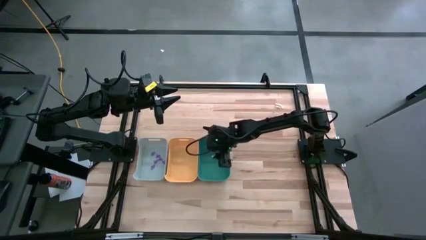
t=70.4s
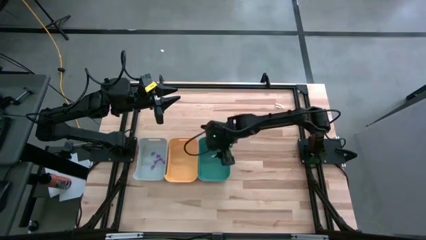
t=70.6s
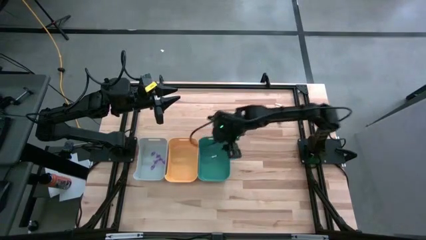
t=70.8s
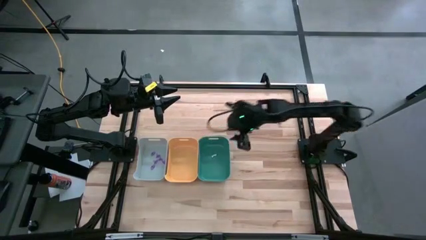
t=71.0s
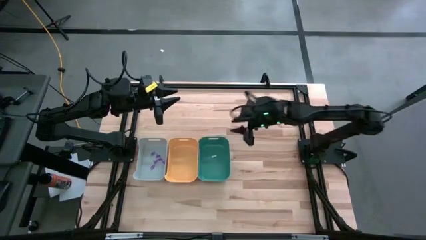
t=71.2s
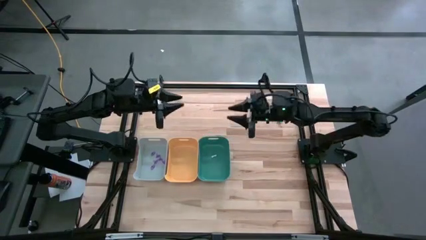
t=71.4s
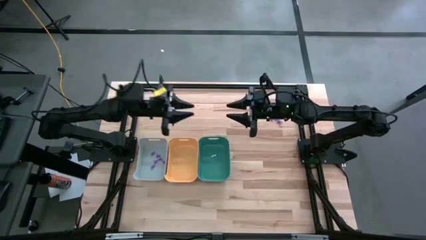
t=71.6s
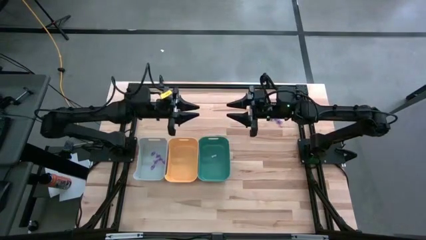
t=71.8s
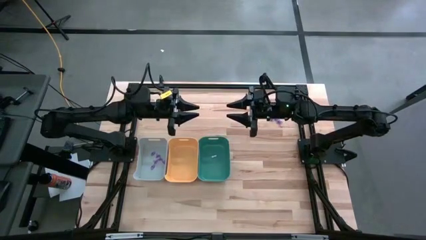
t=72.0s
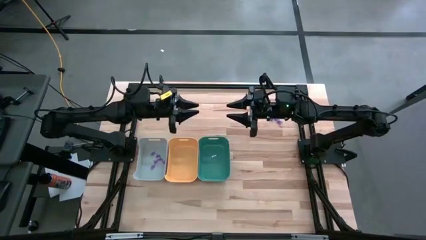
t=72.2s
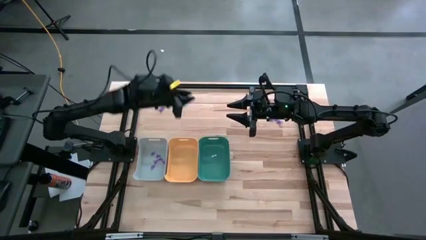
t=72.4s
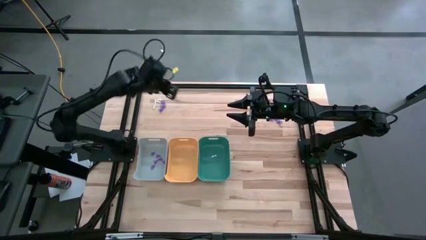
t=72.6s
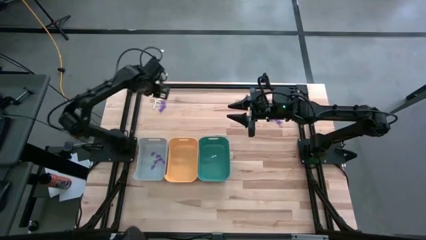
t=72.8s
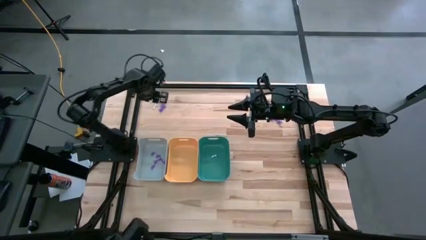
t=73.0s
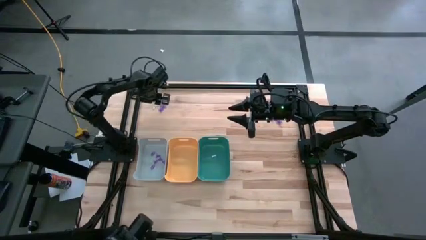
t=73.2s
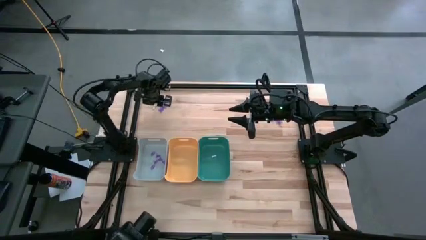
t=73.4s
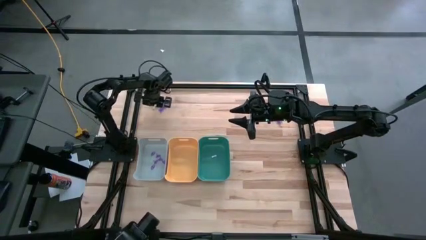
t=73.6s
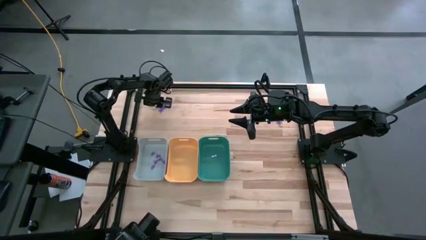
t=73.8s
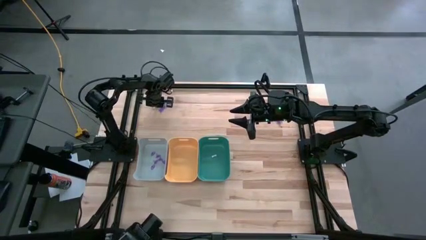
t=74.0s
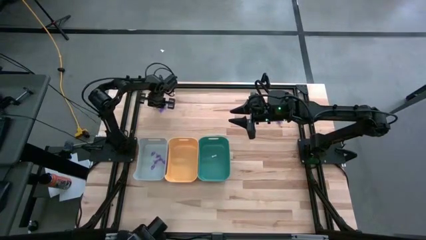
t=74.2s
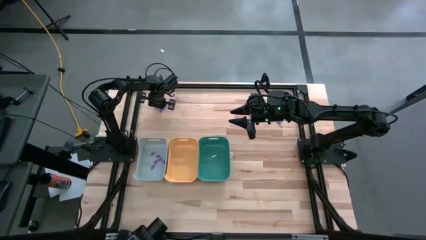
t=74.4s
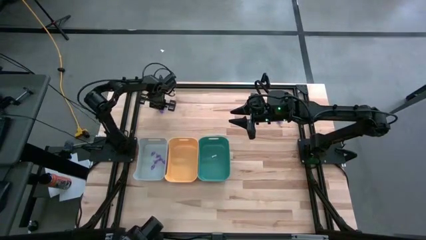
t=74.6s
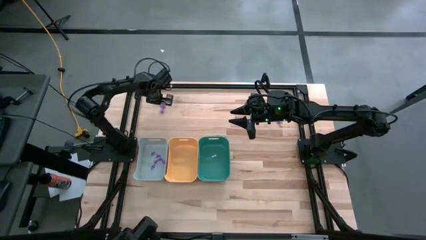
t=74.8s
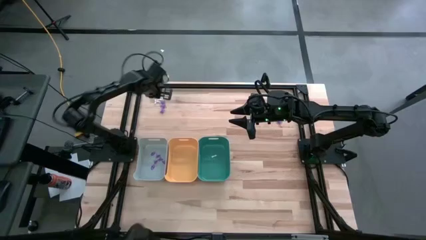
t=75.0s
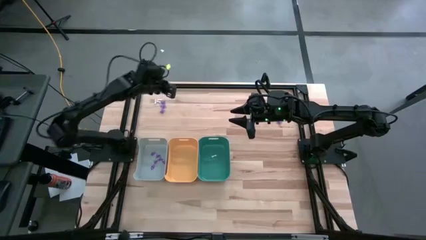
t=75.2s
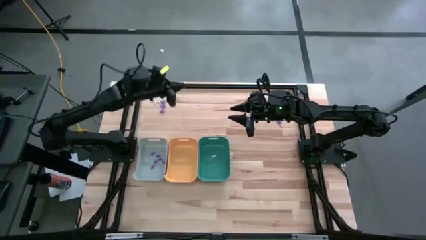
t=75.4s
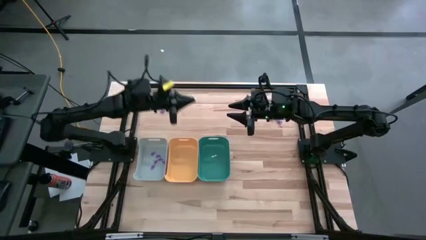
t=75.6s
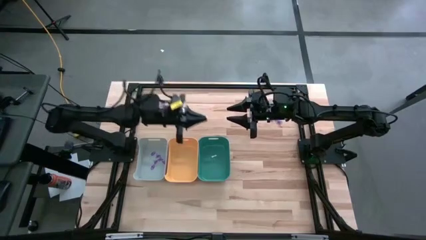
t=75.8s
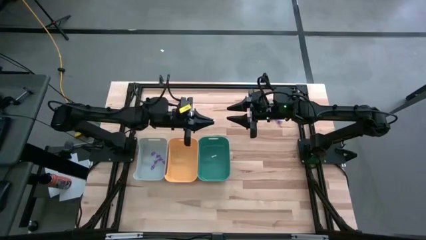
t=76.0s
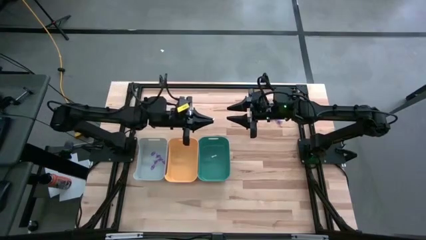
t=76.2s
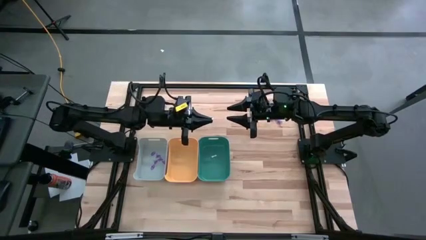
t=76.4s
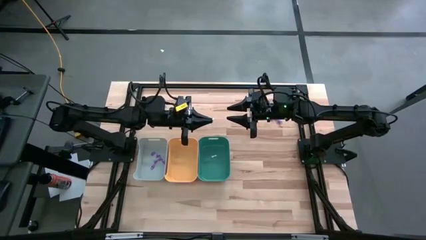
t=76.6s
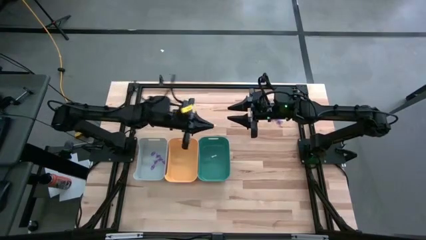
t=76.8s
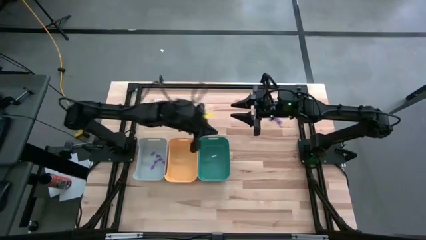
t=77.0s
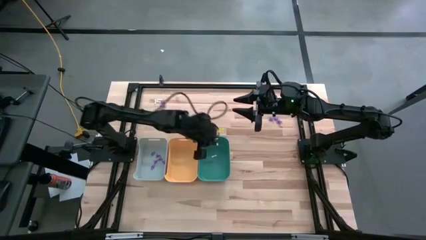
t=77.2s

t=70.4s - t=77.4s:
Task: Sort Halloween decoration
Put the white bone toy into the green bin

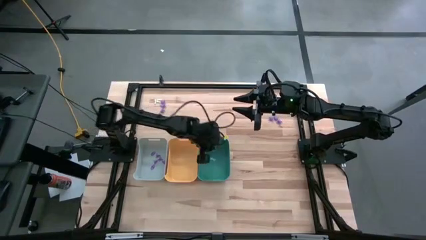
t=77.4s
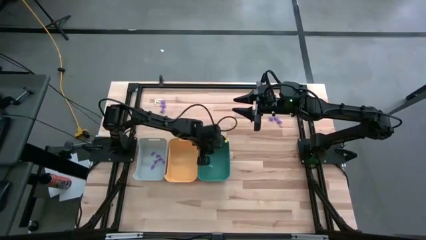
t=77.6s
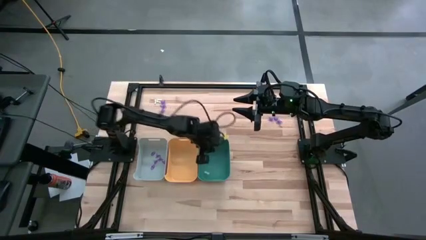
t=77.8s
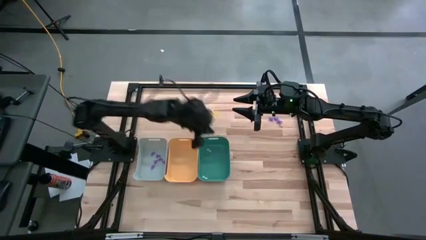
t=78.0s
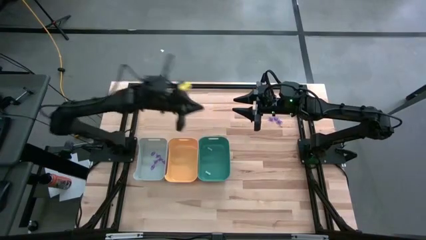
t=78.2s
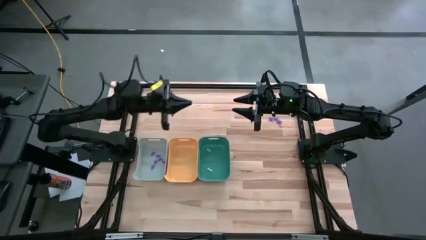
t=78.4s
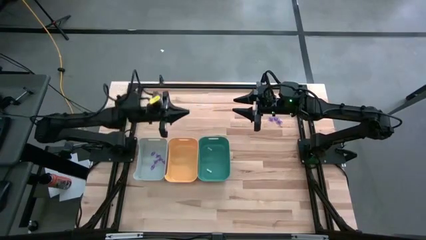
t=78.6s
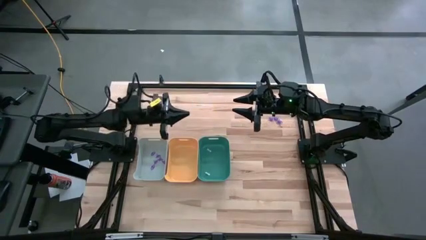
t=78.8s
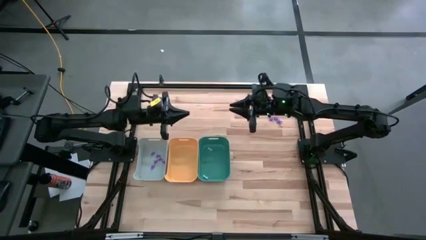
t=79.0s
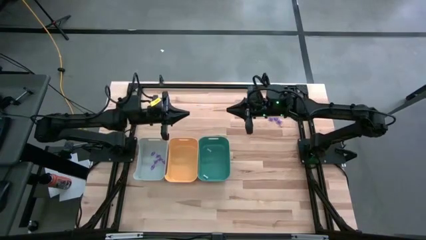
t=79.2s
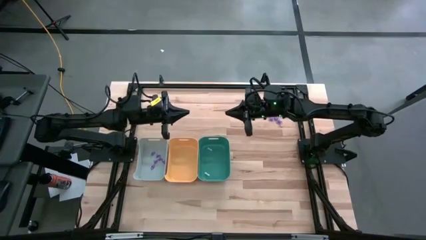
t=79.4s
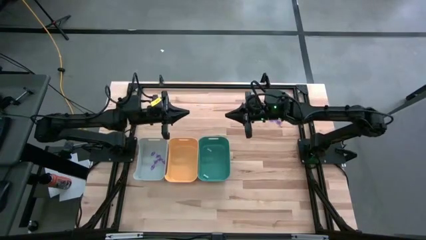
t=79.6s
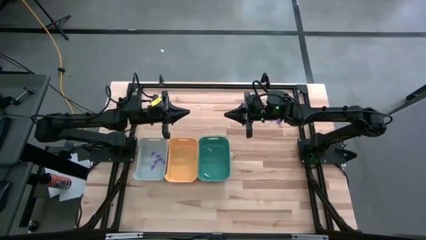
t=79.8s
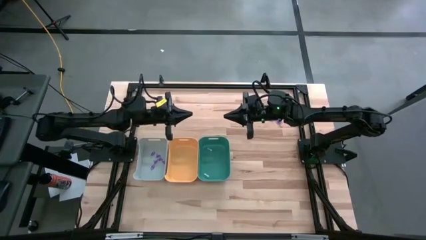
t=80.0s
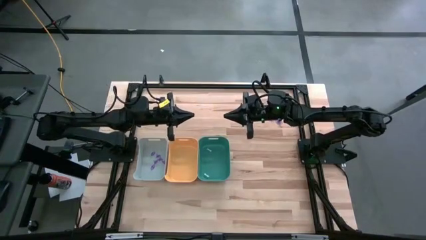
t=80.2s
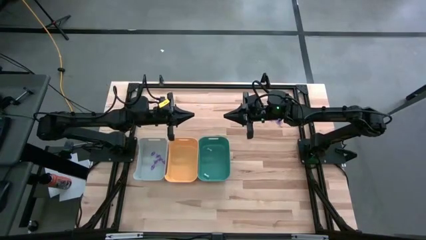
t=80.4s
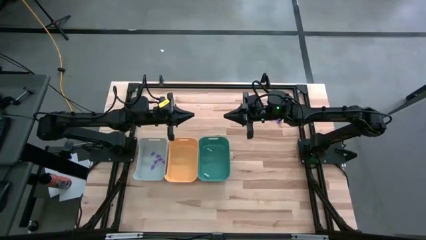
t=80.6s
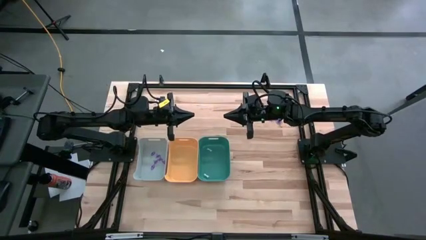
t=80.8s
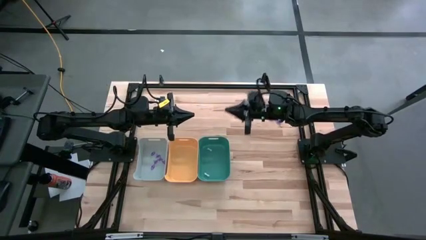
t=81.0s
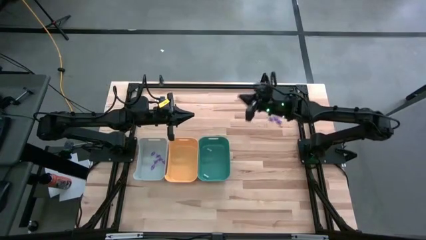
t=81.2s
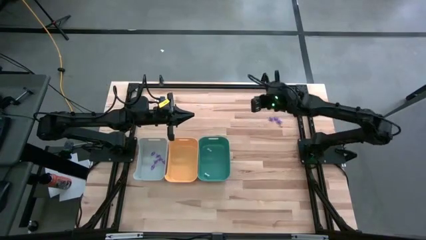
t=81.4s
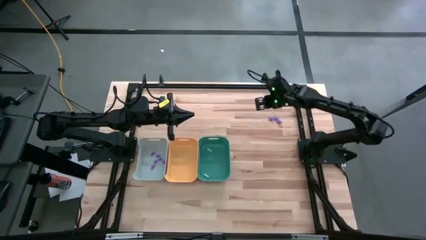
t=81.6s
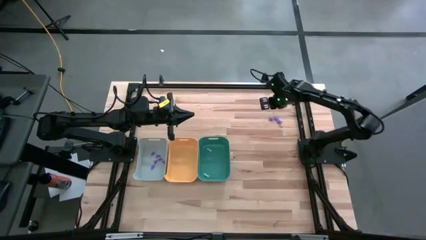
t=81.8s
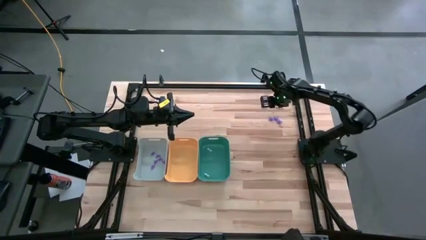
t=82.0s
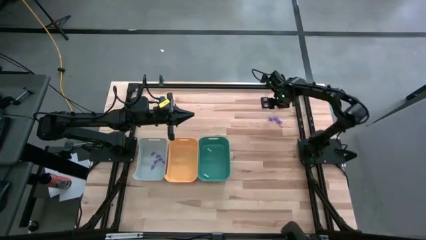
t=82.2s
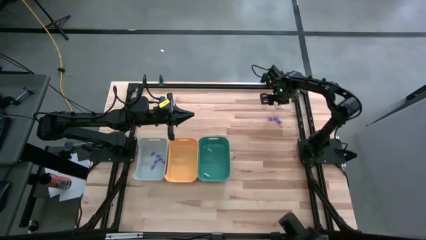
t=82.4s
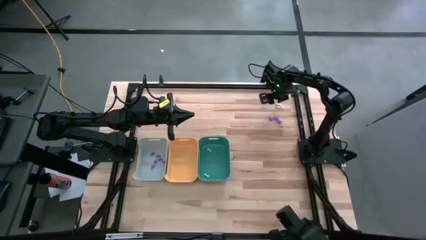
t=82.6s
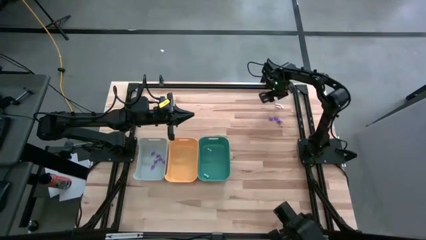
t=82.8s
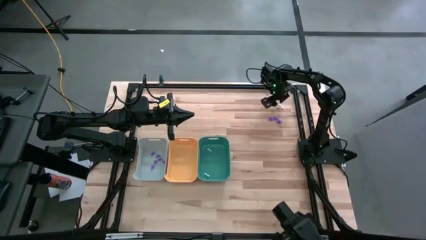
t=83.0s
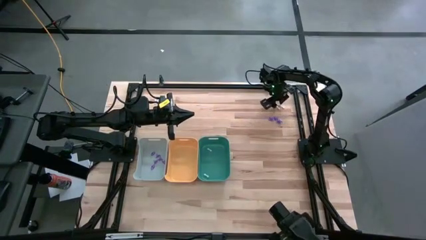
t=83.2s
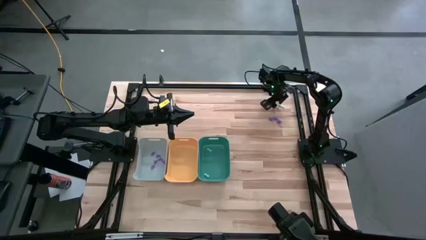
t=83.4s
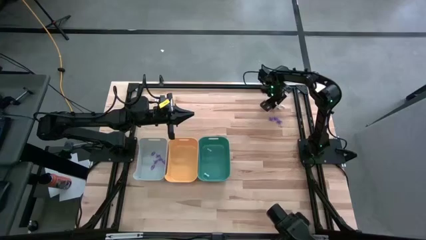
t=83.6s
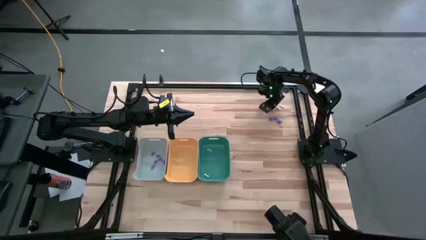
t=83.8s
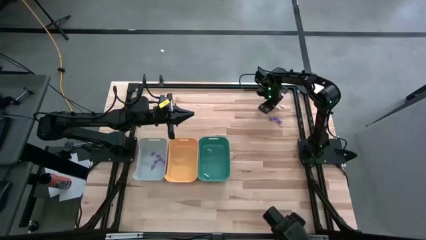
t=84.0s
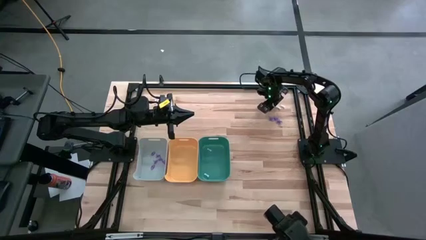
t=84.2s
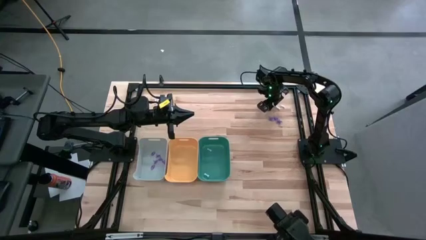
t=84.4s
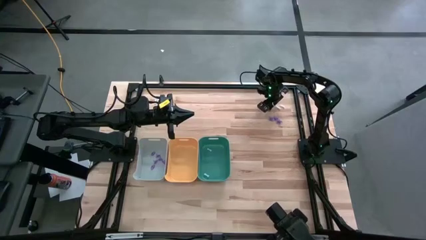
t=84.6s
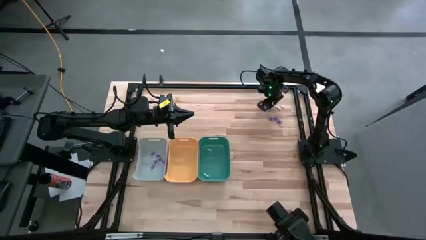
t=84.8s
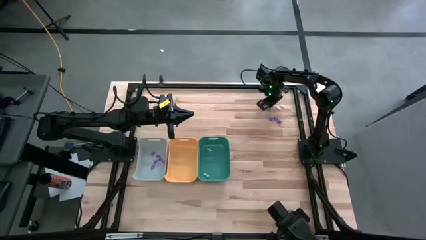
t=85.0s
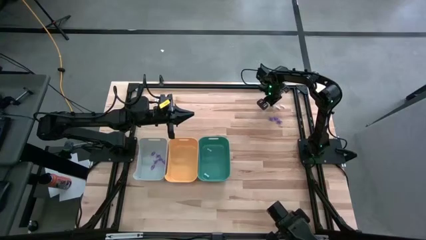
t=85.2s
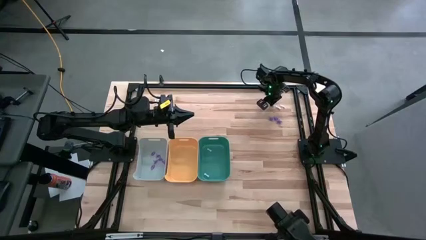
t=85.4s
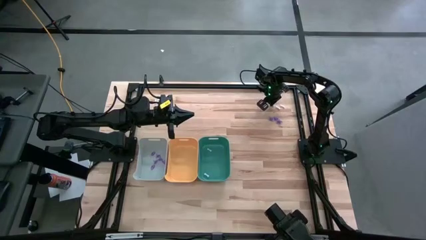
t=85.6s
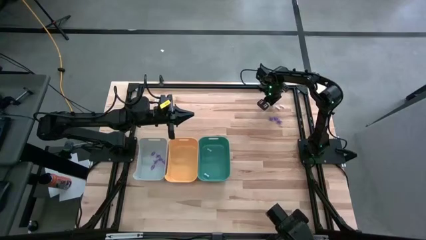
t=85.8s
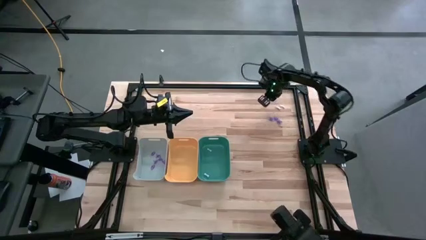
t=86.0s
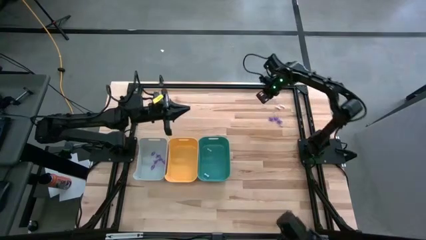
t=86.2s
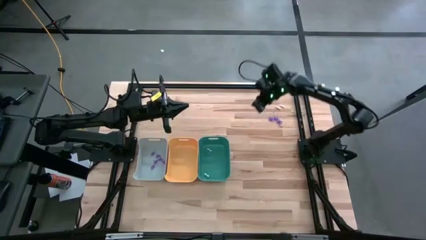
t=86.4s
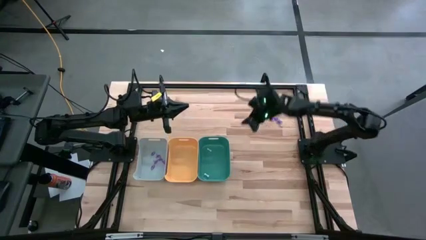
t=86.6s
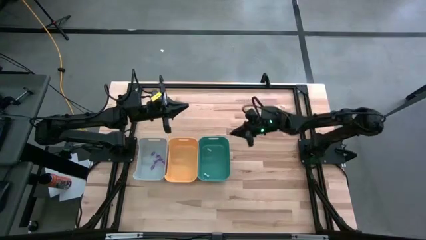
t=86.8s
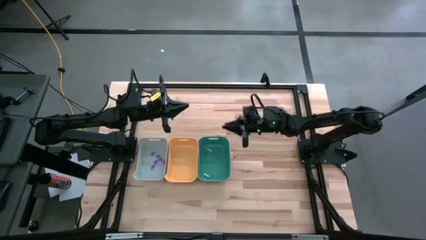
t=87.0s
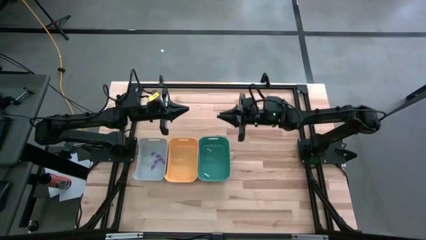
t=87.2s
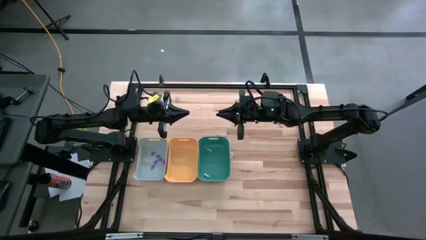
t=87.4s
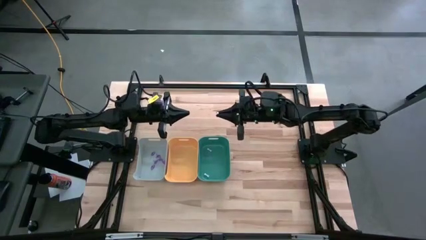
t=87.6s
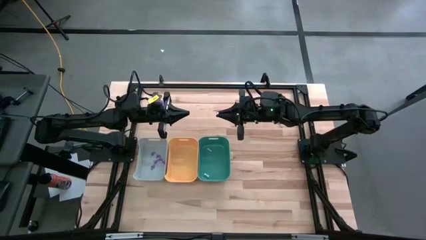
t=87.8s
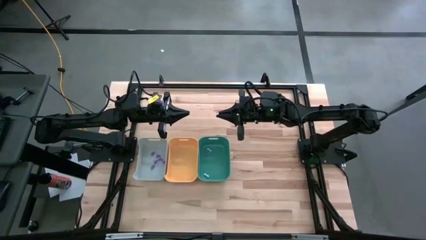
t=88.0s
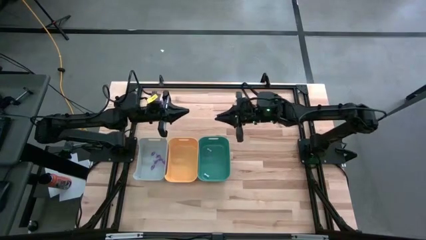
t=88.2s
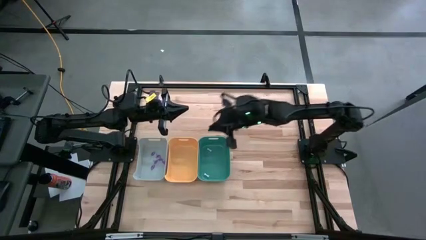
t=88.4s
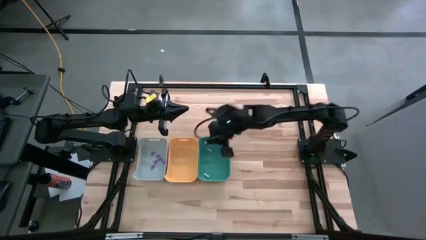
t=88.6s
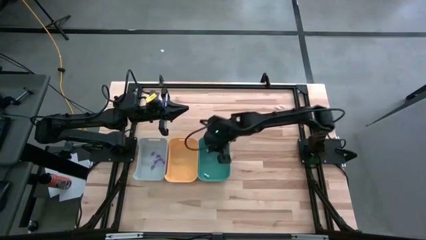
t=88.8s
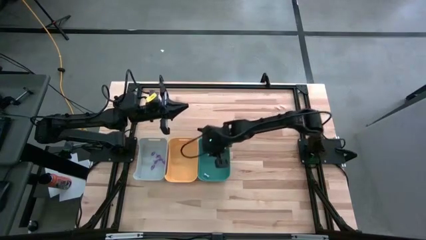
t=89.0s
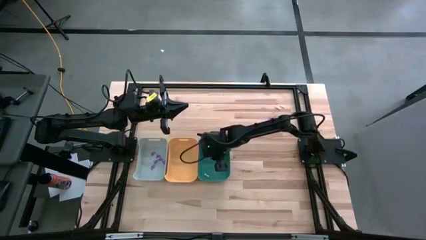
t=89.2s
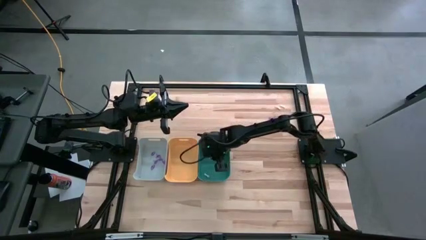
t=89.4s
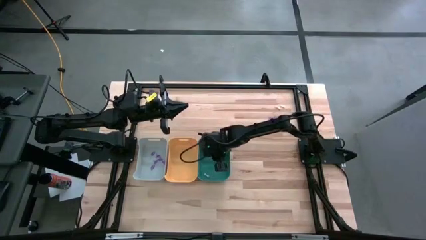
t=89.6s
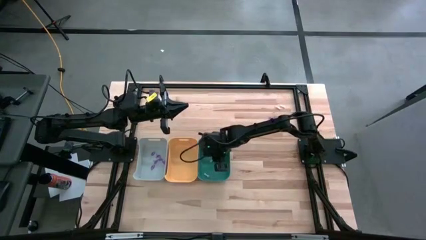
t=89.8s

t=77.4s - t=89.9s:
Put the white bone toy into the green bin
